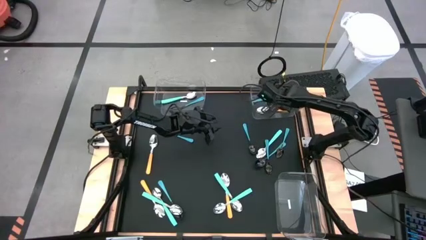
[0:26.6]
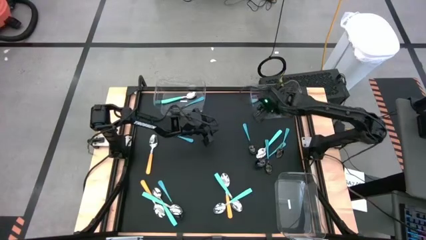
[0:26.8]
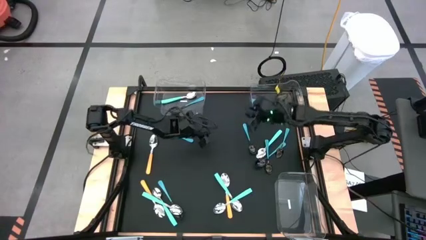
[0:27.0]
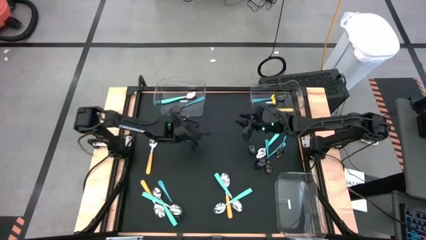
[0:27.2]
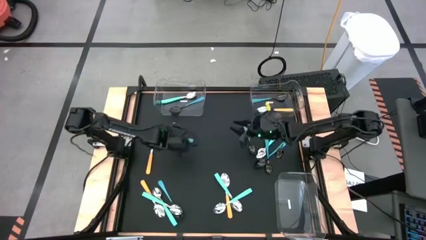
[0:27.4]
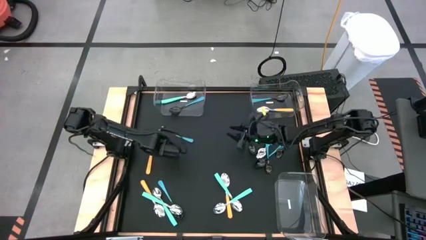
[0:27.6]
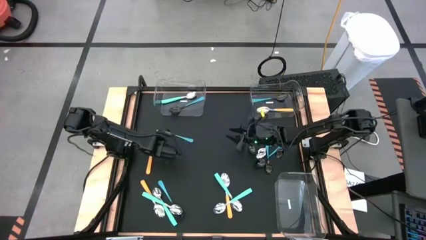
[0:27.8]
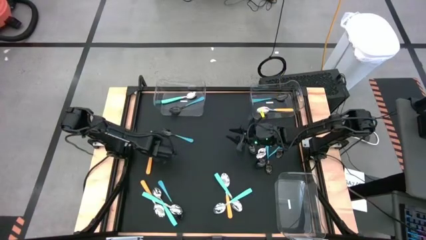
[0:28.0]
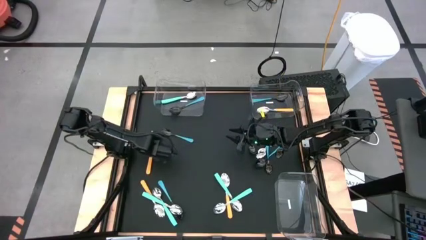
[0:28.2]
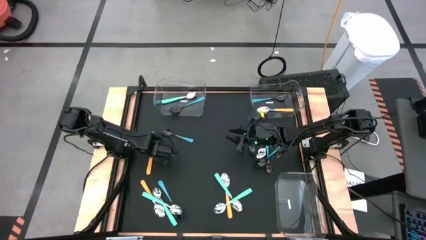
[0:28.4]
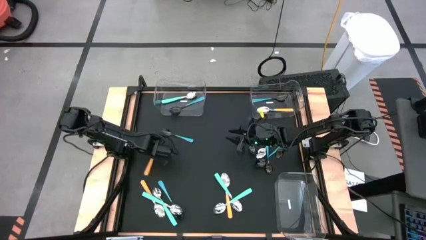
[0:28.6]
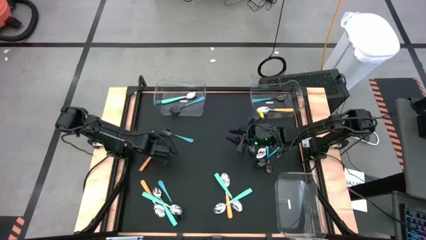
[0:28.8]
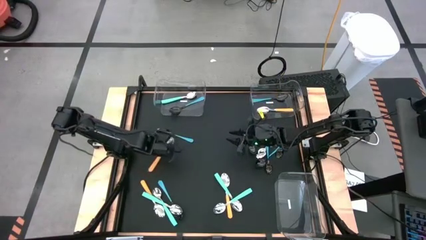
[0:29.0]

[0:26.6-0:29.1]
Task: Sort silverware by color (type)
Put the yellow spoon into the top left transparent bin

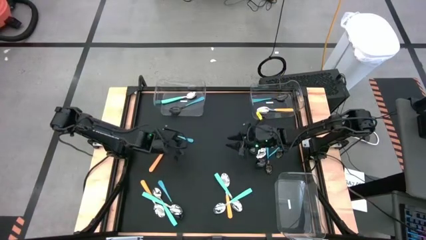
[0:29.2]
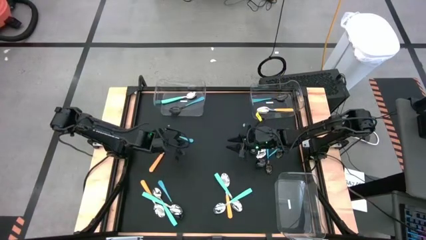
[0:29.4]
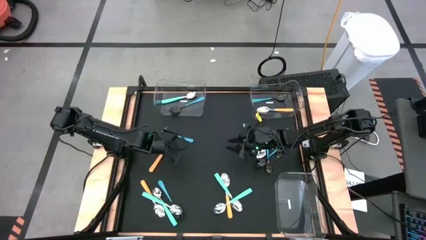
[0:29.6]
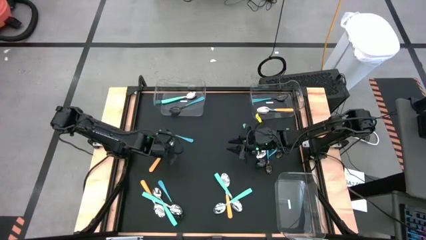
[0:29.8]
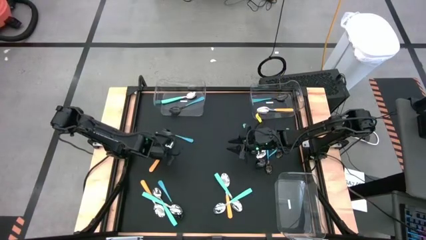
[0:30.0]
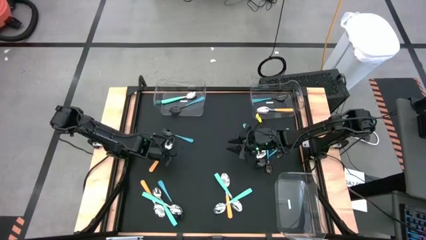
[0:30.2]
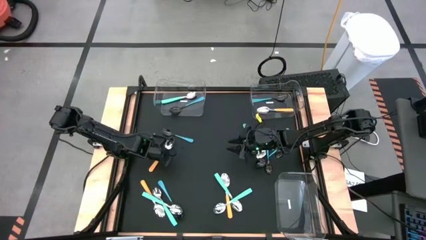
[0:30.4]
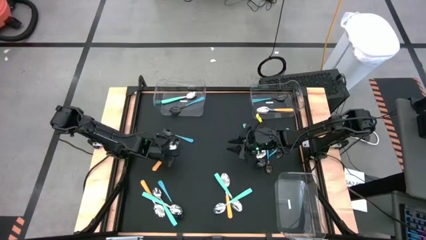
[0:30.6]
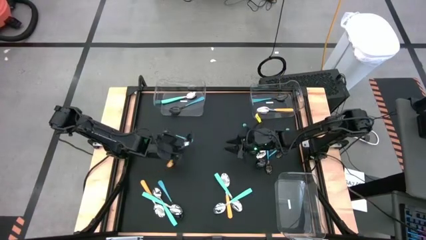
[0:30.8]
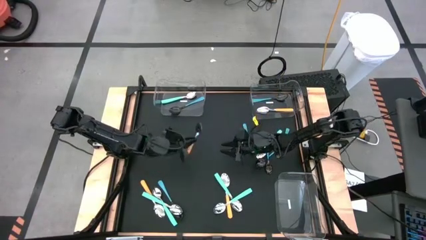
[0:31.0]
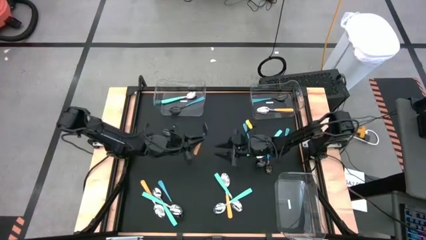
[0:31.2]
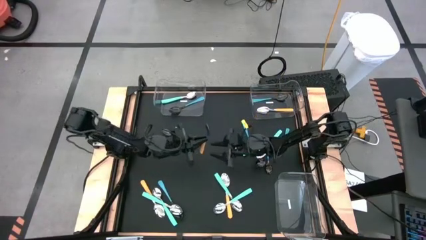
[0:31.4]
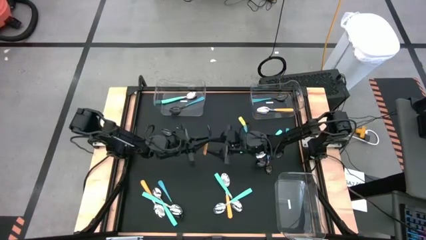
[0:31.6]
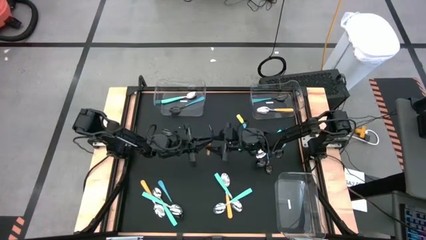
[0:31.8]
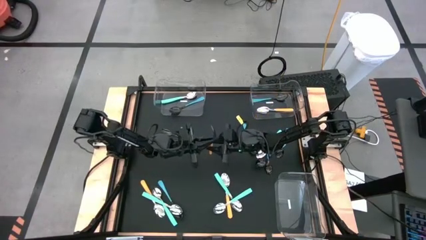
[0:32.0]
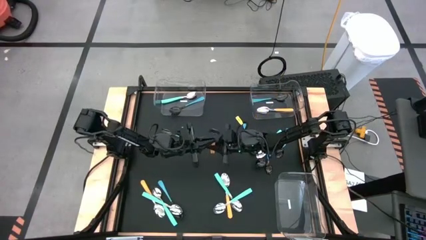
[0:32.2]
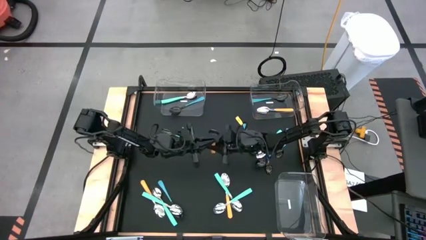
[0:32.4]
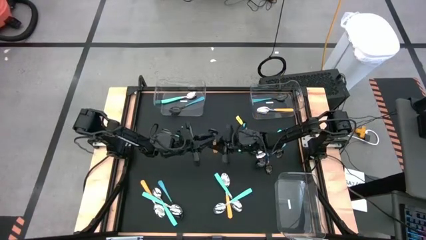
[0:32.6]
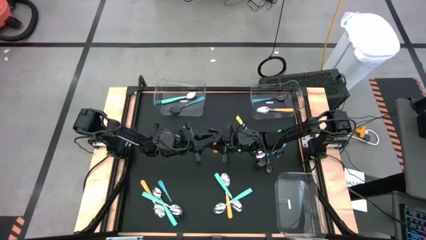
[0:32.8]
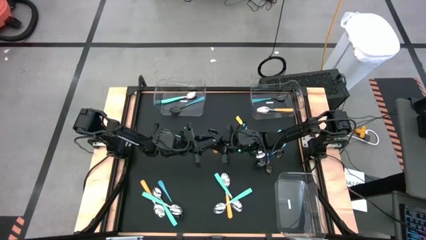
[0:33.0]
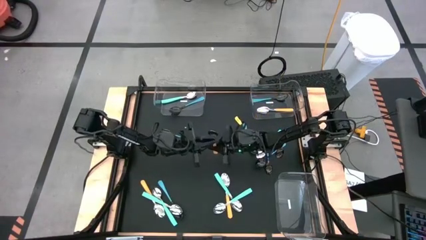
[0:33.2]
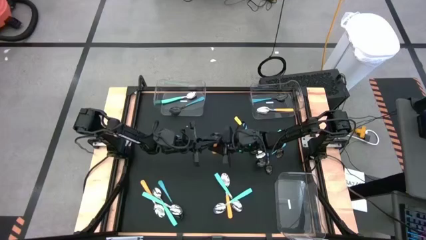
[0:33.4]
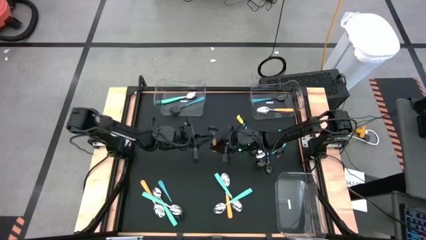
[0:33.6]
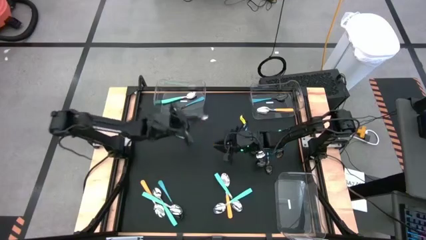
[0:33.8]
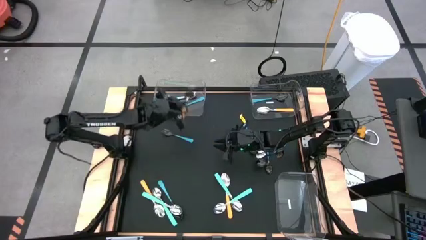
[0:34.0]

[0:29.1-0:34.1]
Put the yellow spoon into the top left transparent bin

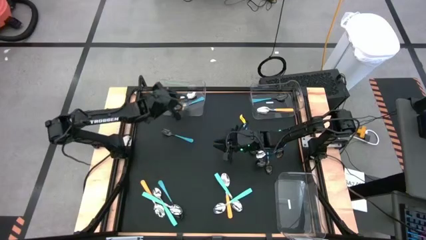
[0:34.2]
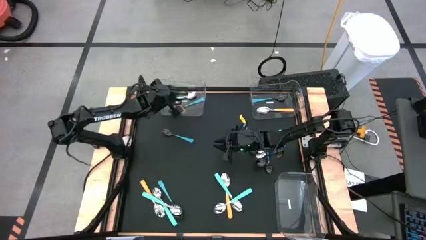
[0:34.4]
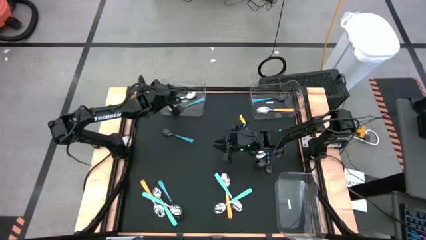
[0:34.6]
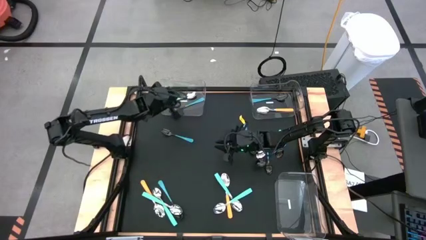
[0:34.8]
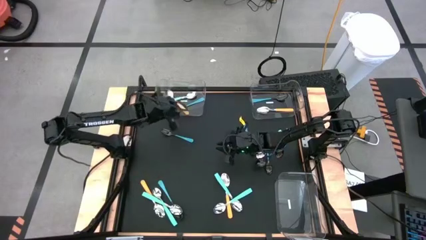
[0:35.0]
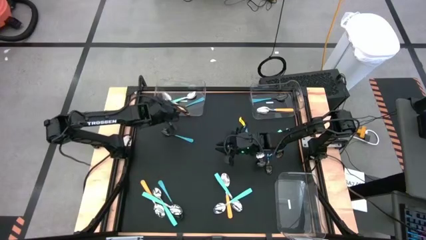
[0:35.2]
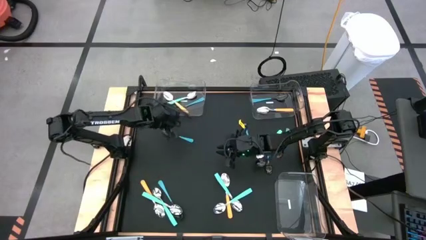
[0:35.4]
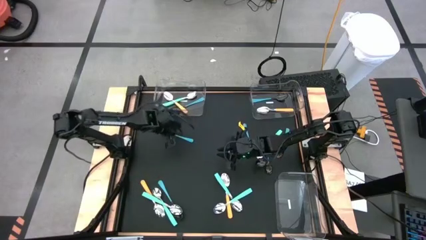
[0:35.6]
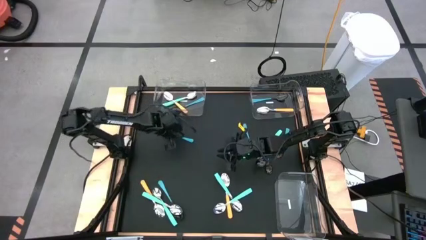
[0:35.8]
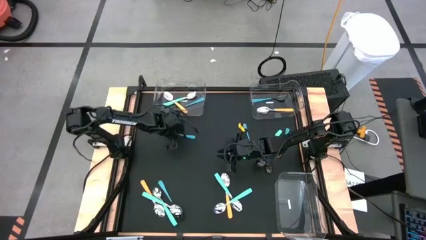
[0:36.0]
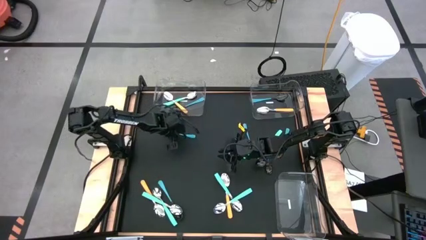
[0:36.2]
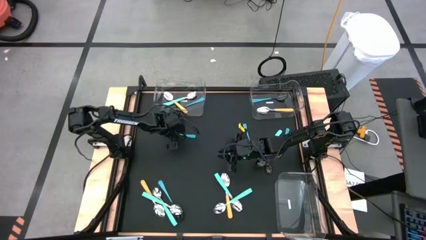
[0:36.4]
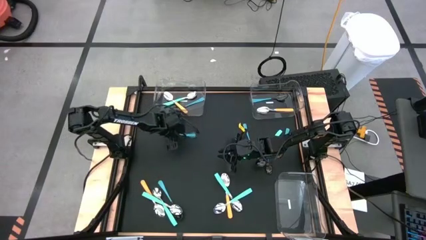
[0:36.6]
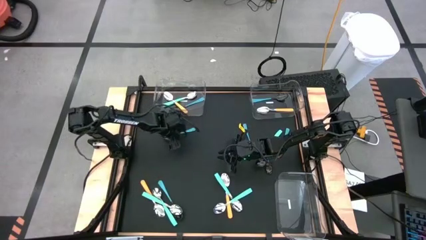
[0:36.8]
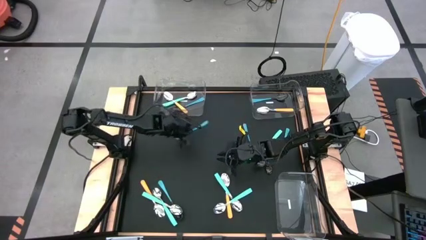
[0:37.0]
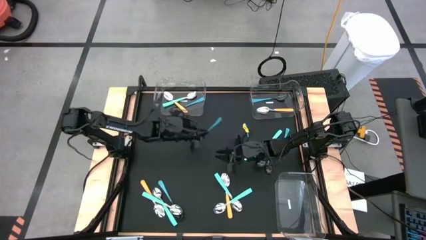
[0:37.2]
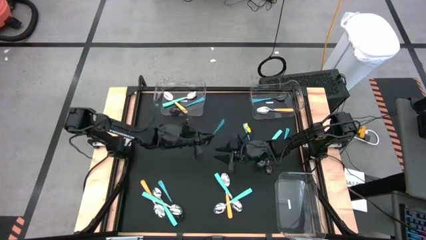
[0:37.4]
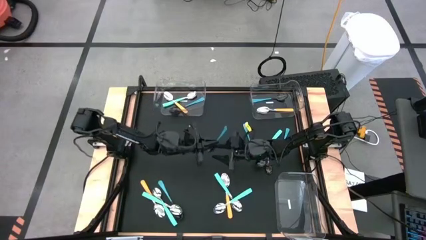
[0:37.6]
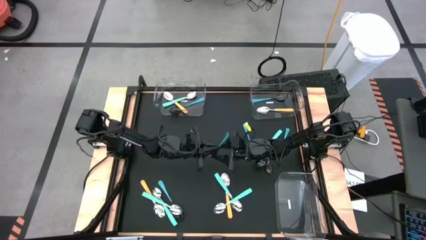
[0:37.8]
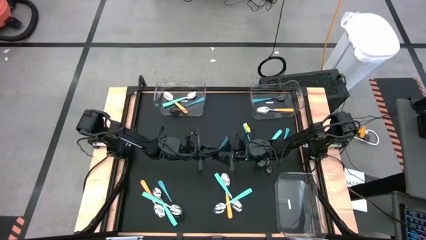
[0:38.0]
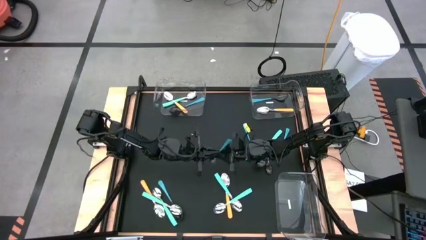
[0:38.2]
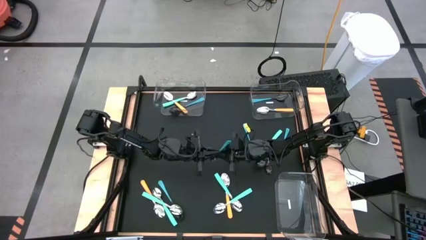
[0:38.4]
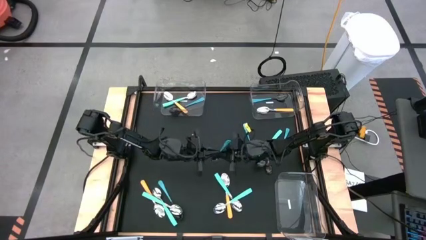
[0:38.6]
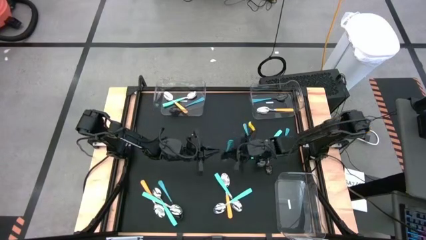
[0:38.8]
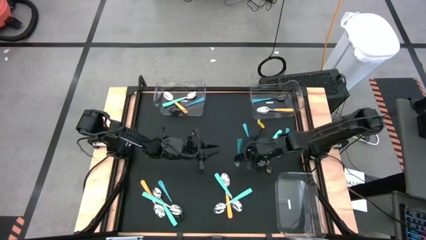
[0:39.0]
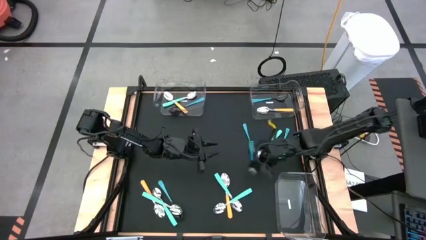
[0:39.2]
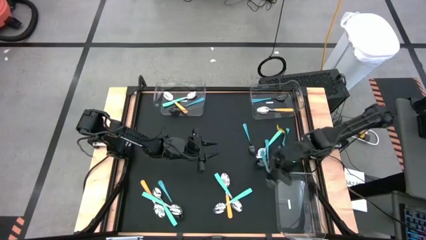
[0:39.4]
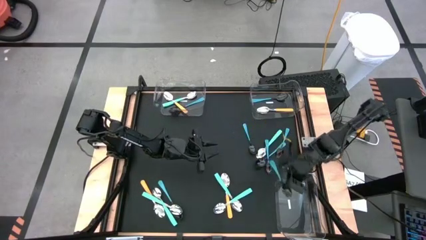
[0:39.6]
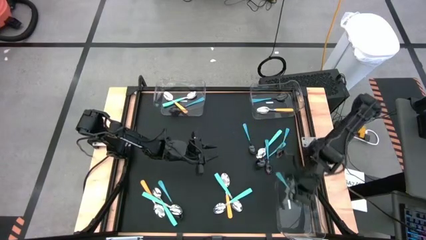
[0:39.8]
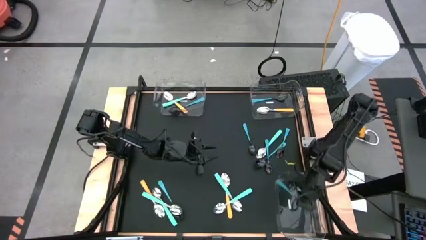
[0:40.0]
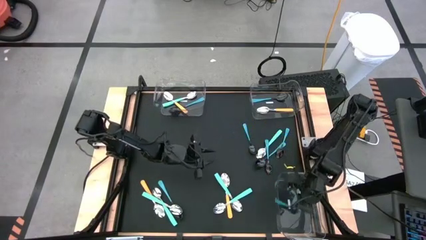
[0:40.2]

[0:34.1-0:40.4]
Put the blue spoon into the bottom transparent bin

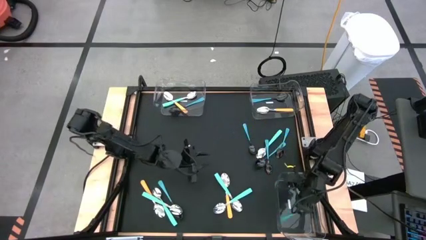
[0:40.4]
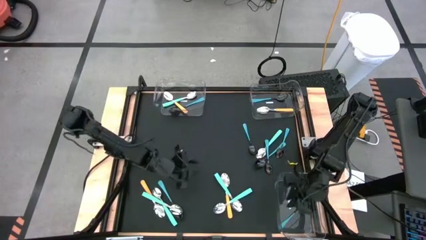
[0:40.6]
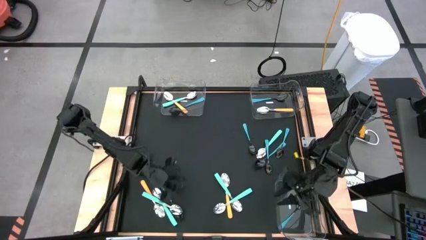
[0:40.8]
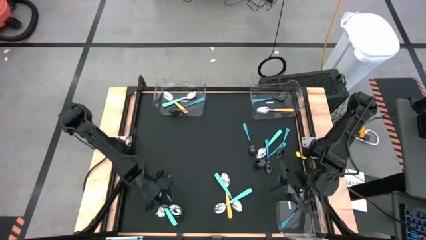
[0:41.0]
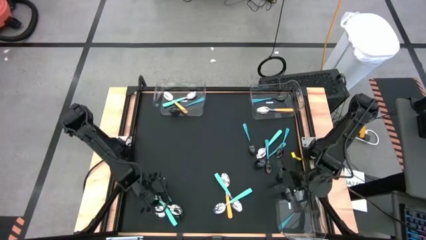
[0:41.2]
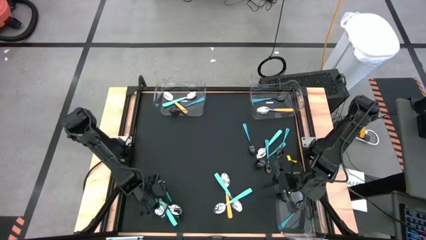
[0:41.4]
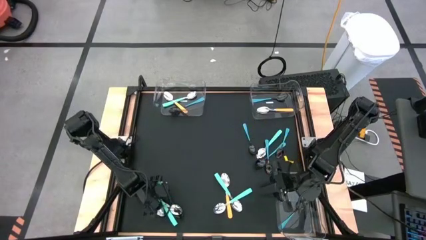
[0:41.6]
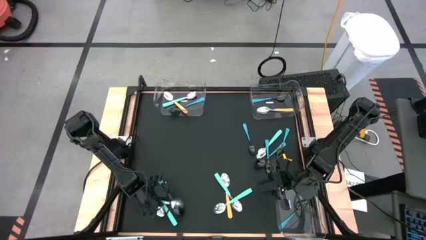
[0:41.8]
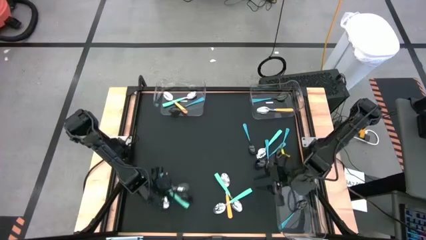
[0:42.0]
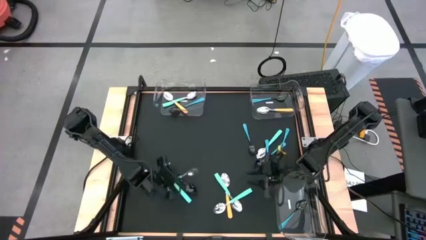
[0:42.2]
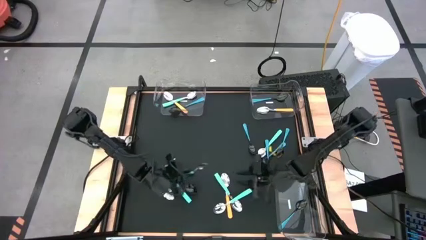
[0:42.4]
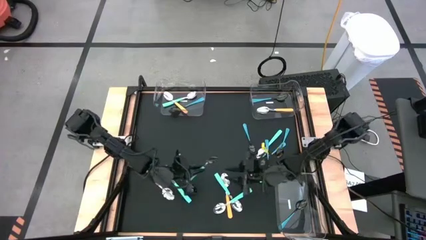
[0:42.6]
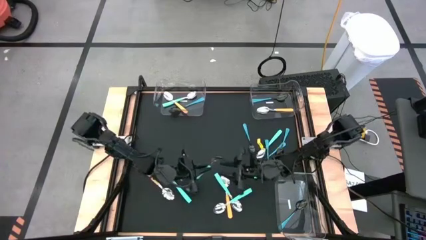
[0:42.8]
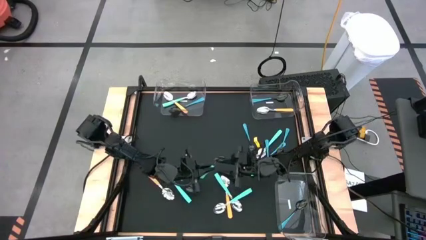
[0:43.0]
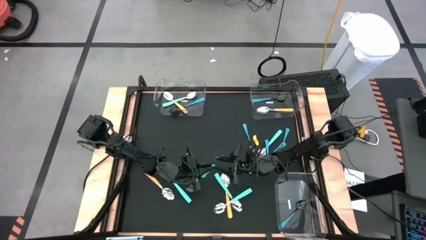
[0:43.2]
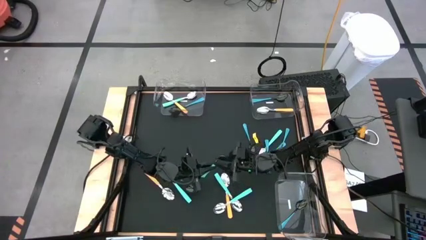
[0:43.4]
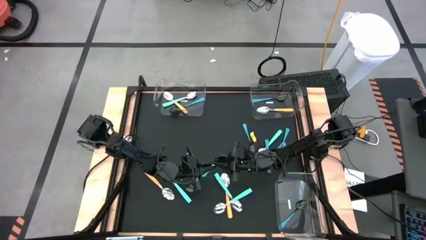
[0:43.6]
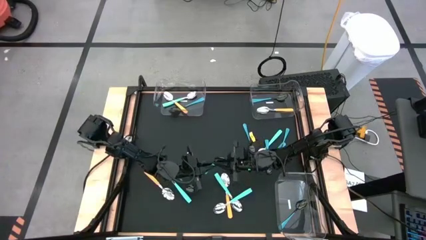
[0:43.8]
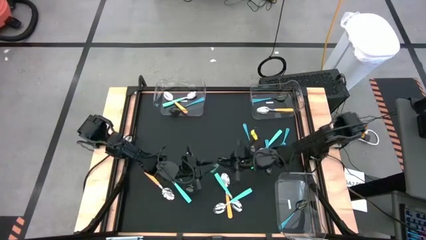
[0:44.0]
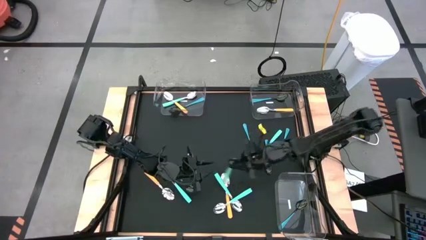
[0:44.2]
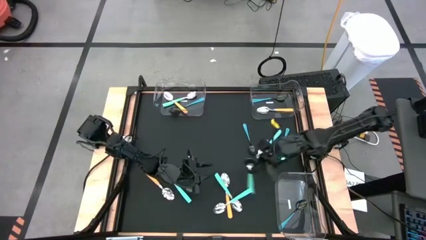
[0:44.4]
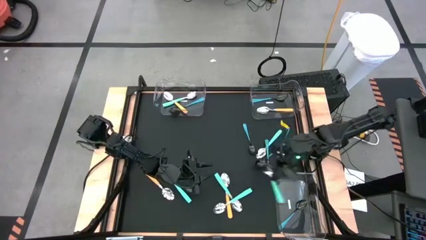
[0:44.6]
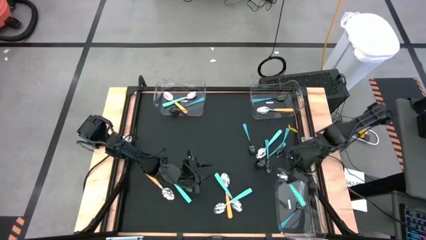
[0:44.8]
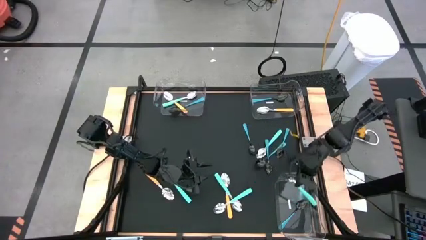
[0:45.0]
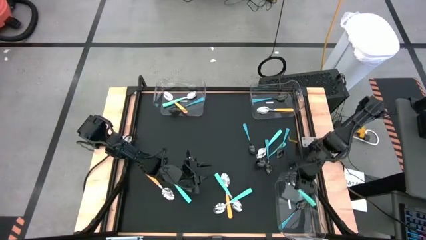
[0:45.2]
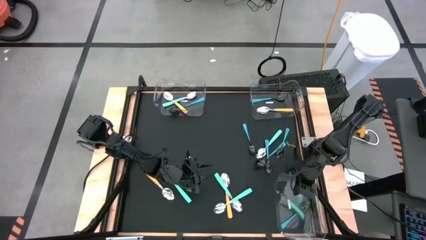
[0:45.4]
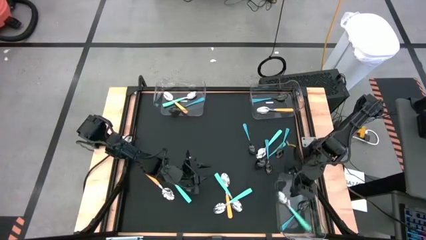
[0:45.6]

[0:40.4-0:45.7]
Put the light blue spoon into the bottom transparent bin
